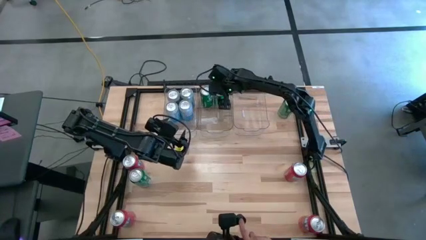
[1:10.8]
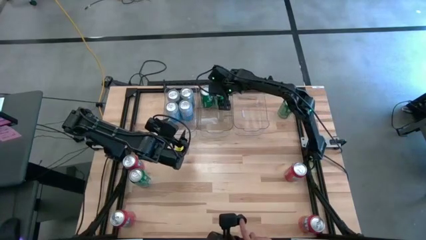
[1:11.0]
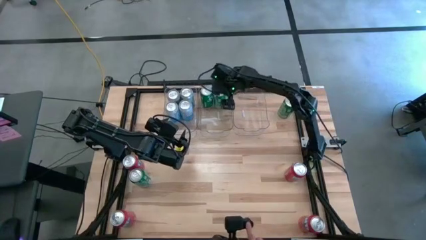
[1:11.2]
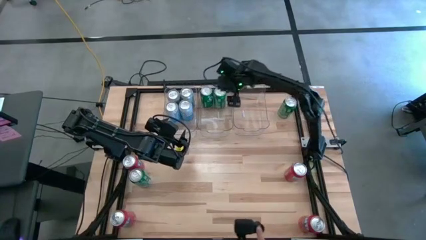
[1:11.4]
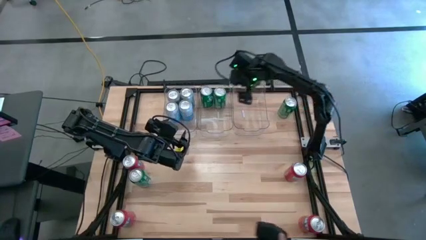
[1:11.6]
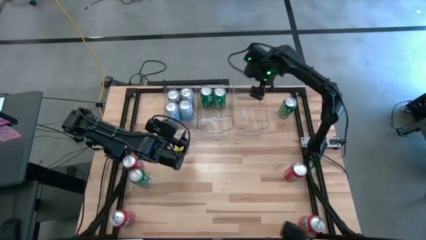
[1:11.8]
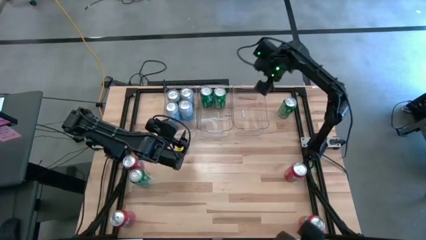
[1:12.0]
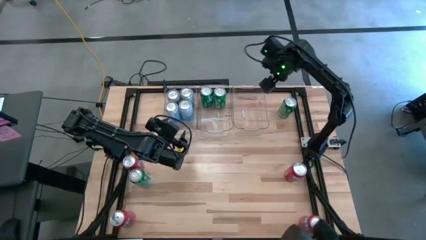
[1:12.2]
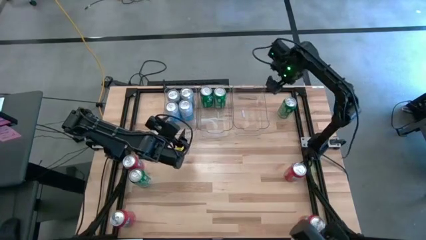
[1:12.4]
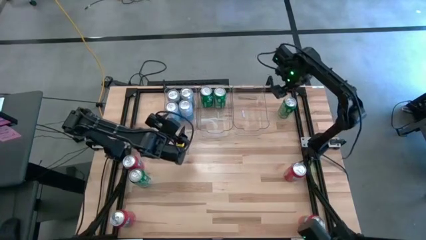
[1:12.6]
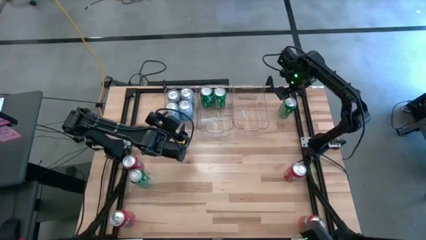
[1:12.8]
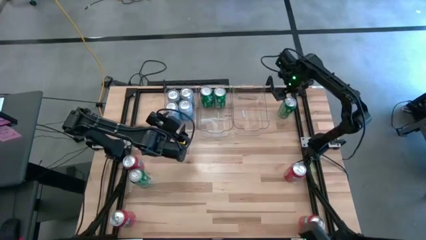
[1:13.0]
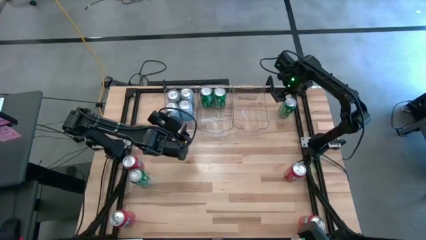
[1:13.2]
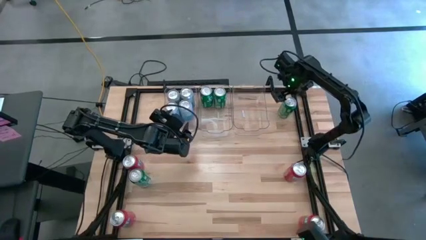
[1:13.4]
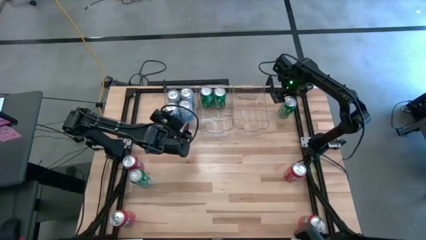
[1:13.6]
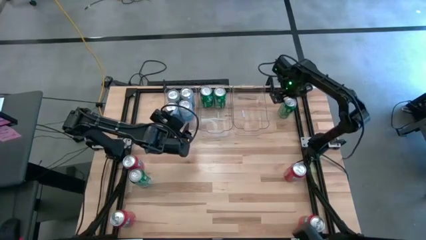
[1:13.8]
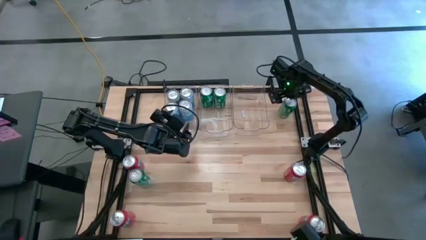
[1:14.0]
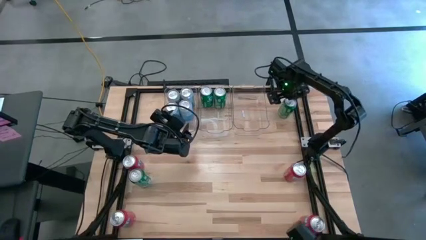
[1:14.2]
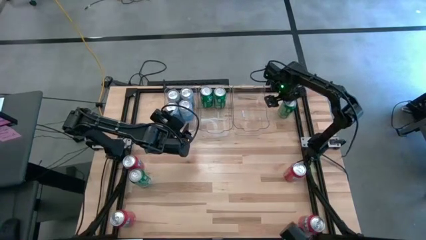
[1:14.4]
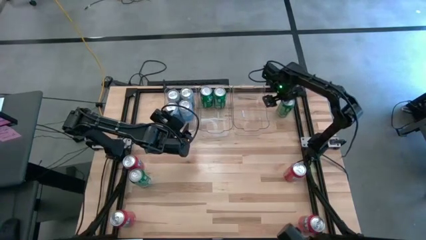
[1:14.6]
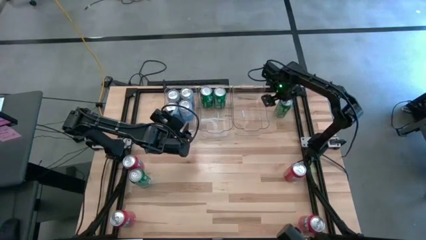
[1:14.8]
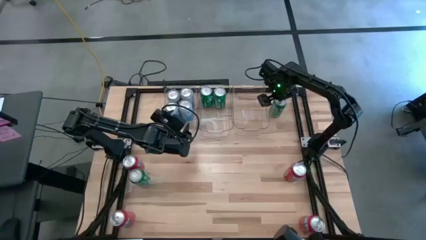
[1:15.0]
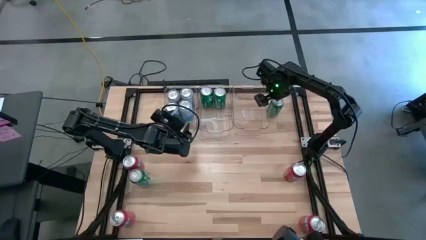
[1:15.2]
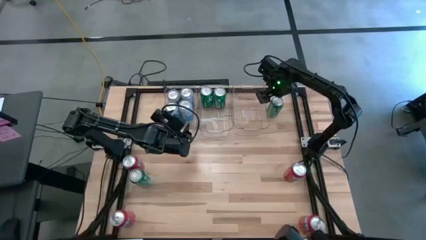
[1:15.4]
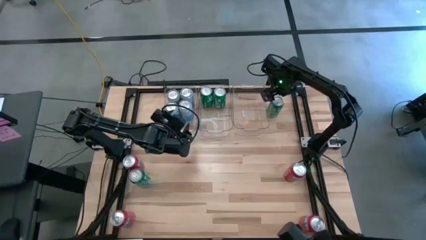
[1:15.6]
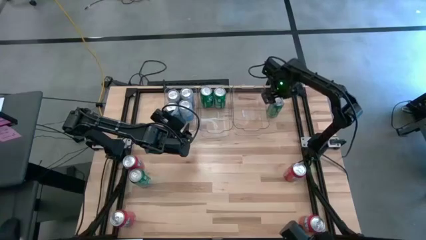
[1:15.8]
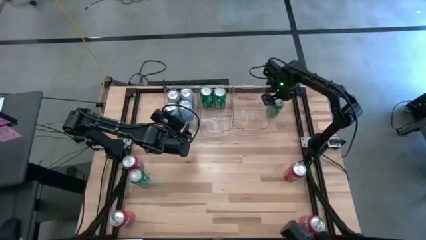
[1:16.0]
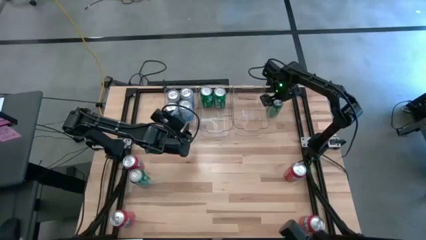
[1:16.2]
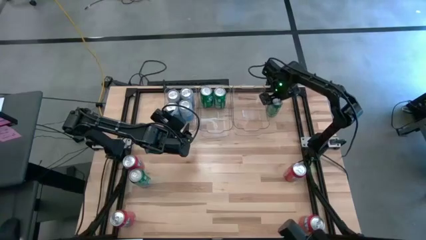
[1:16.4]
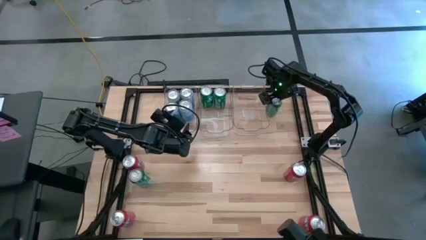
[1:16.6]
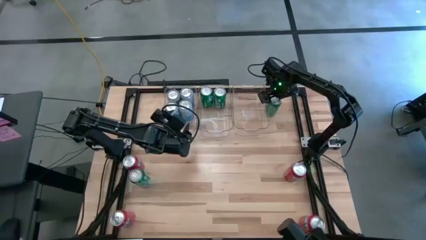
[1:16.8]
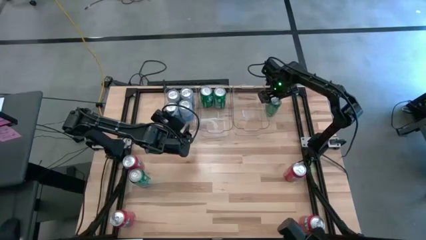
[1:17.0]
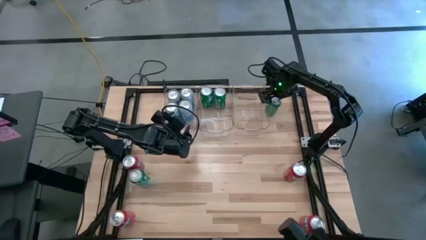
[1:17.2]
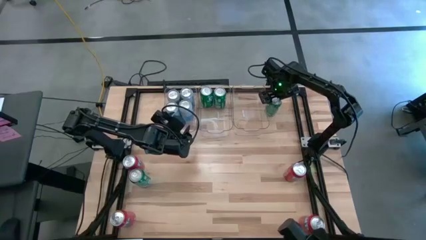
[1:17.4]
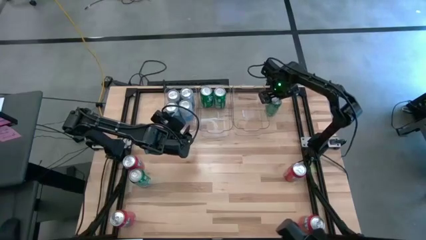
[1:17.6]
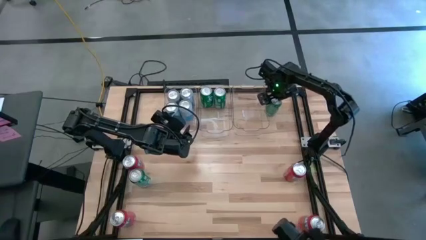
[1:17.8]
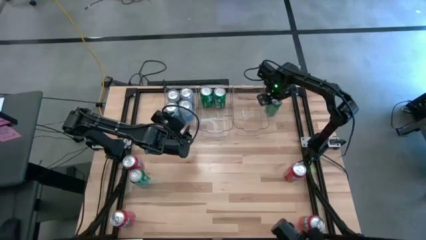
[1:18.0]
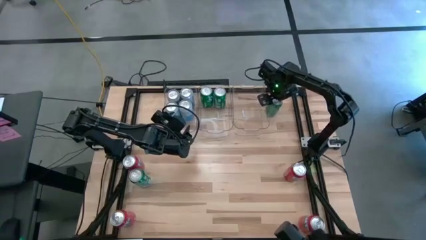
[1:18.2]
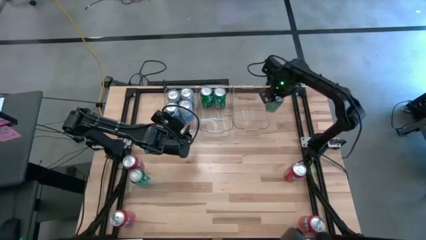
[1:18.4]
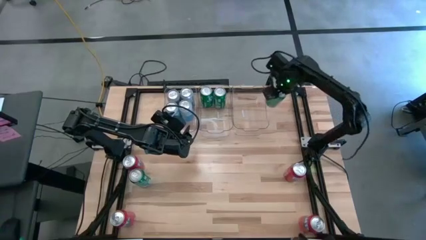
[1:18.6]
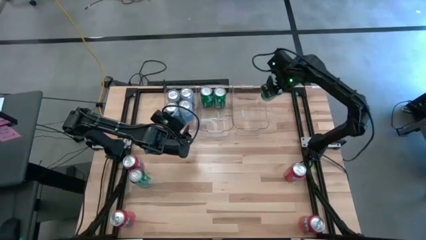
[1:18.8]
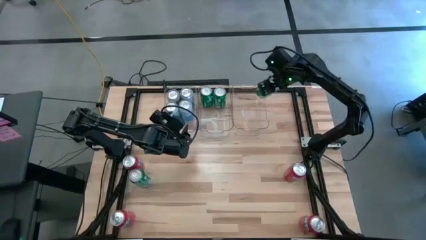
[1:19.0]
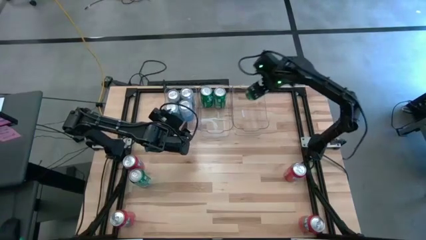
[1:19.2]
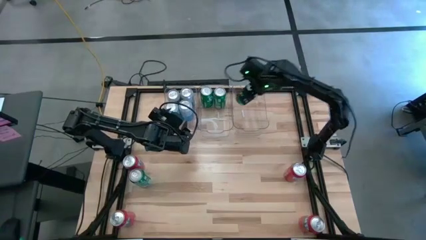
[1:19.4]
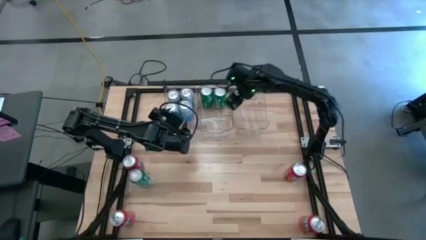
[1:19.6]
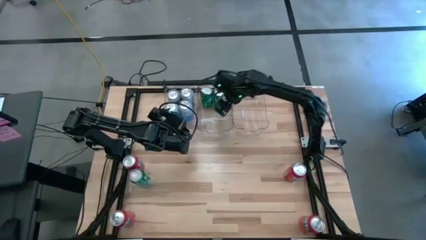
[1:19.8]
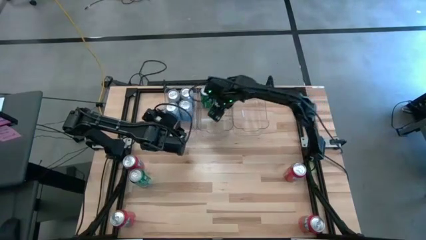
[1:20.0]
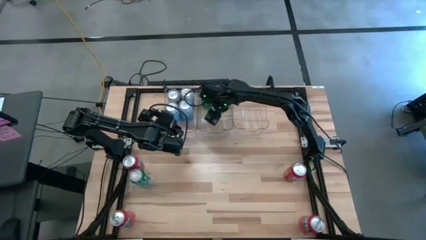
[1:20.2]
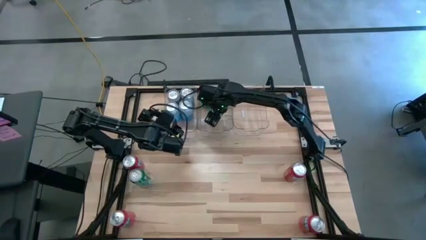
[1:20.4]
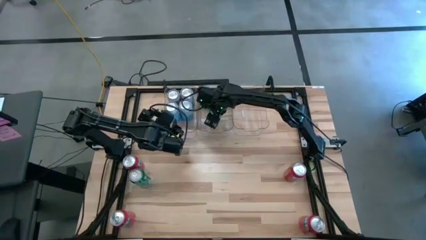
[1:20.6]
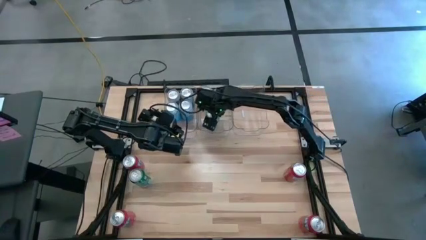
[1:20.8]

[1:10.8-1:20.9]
Task: Sort soda cans
Put the top green soda can into the middle transparent bin

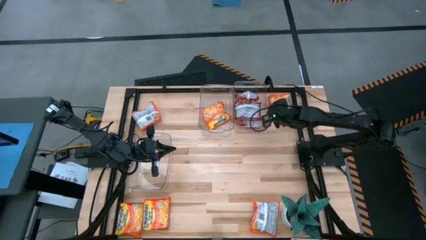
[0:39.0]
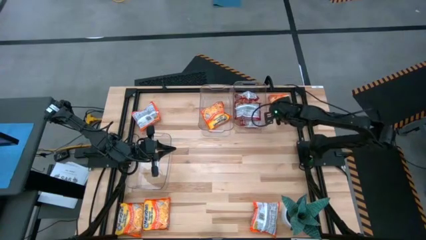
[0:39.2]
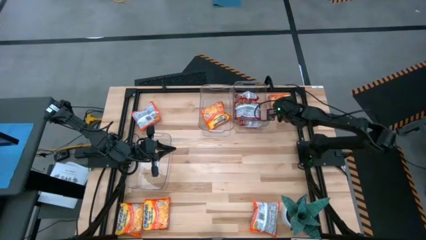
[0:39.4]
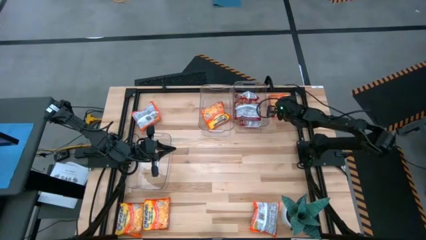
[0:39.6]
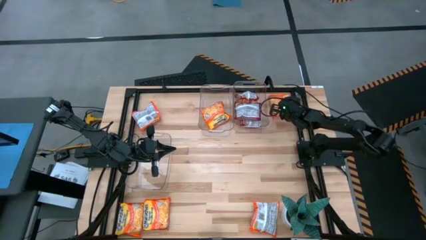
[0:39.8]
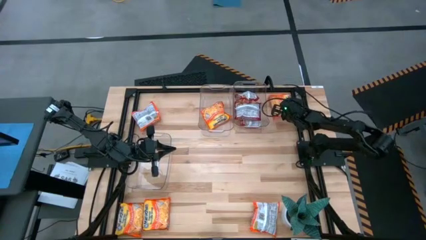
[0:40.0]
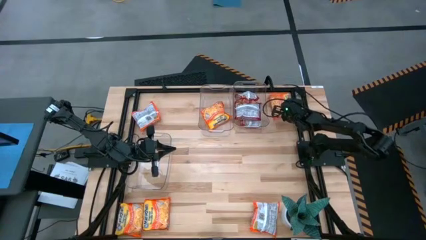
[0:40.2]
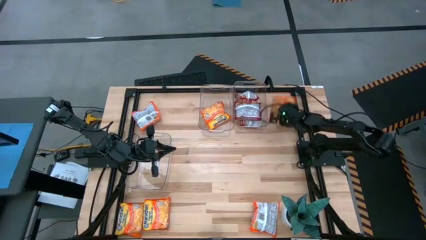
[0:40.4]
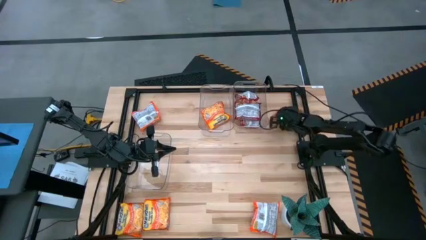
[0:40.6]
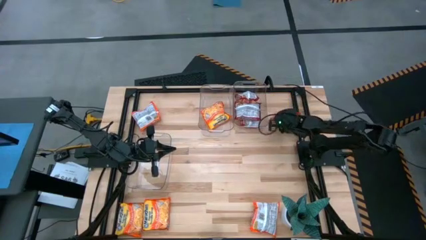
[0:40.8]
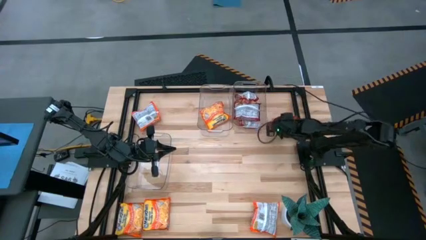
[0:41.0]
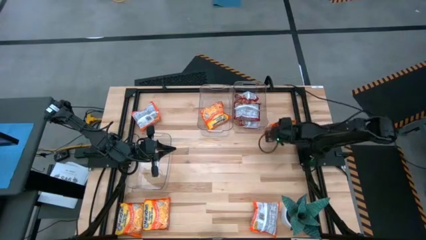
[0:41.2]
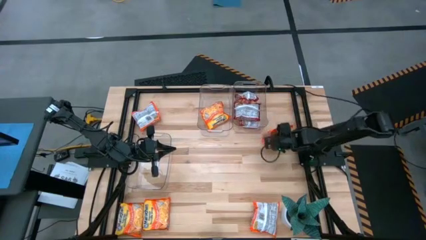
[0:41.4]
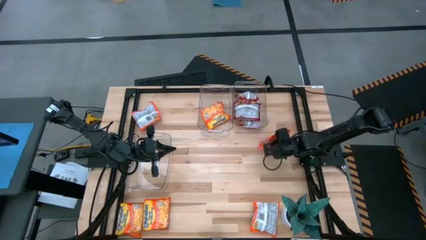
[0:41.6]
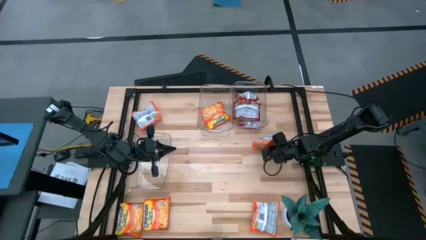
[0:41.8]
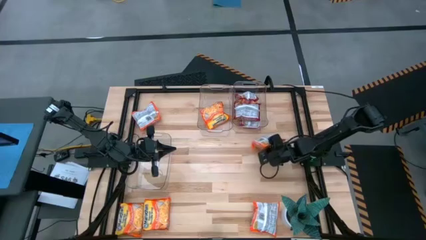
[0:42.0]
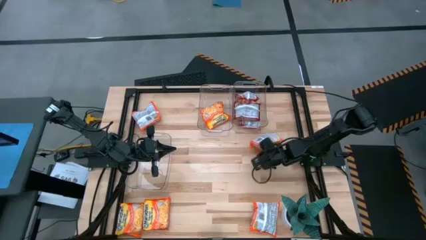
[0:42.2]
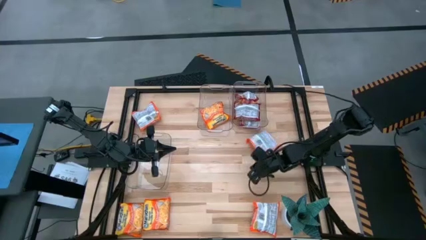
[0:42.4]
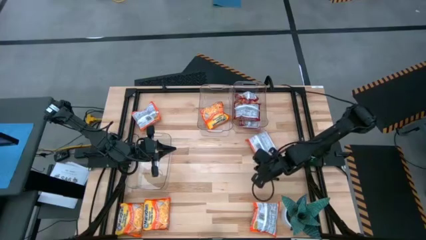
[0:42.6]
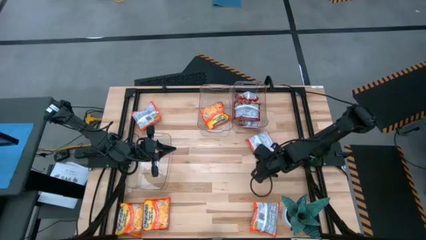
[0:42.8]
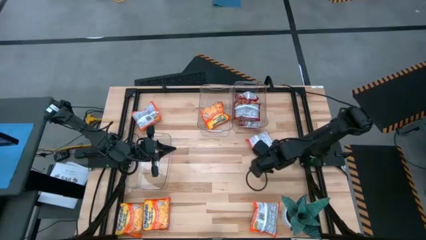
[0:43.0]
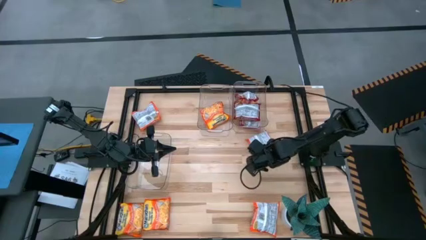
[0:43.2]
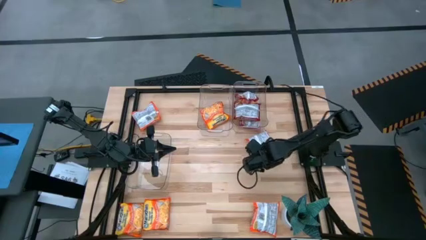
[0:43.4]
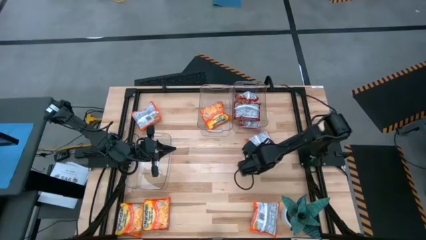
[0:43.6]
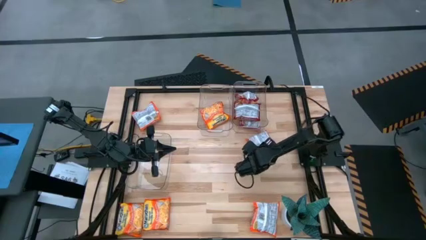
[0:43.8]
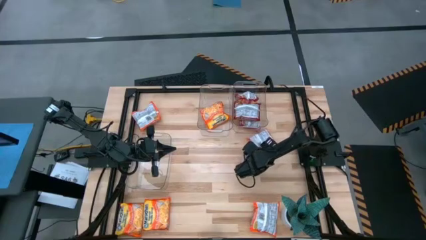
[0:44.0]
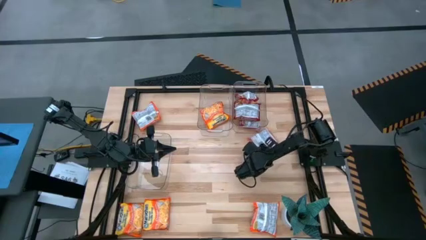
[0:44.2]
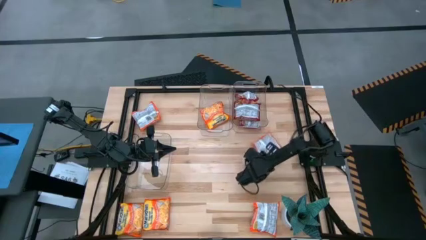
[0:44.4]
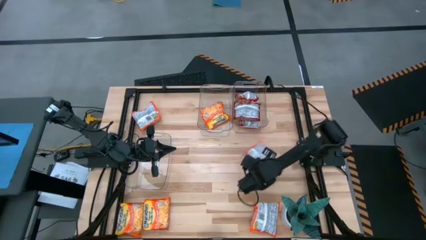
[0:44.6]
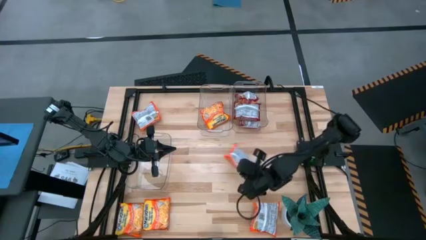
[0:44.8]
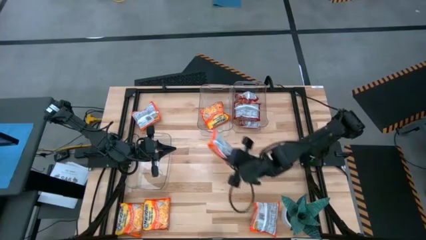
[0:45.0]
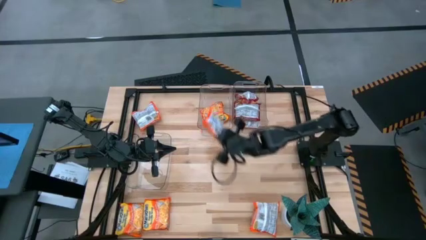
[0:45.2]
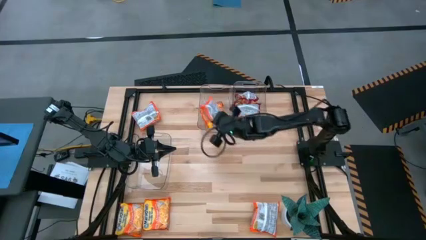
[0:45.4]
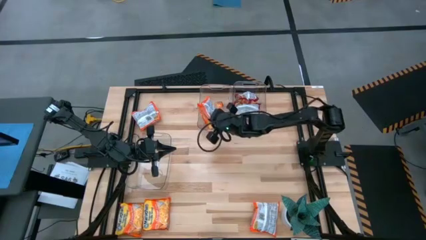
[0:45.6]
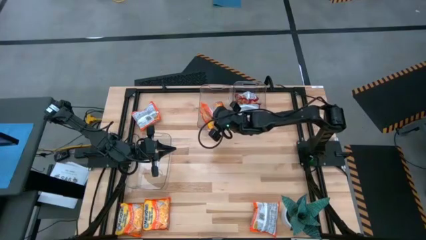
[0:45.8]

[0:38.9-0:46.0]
Task: Sort Maruchan noodles
Put the orange noodle pack into the top left transparent bin
